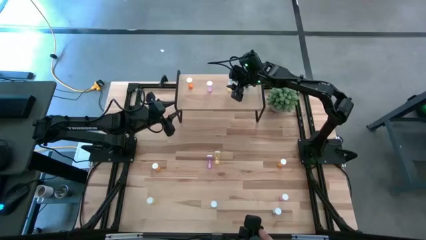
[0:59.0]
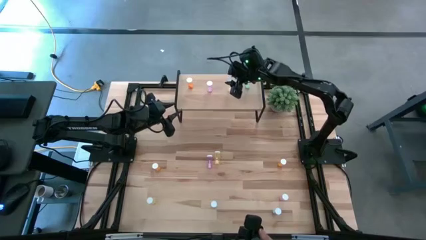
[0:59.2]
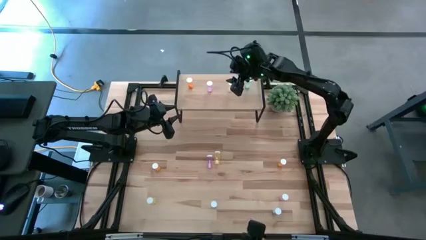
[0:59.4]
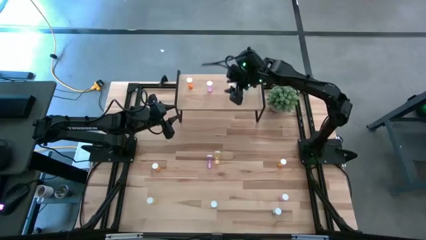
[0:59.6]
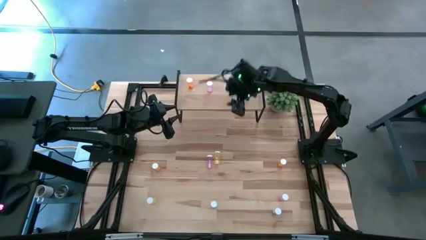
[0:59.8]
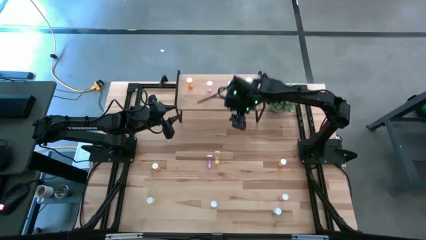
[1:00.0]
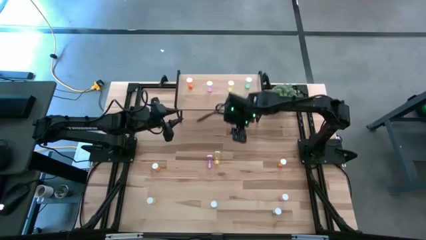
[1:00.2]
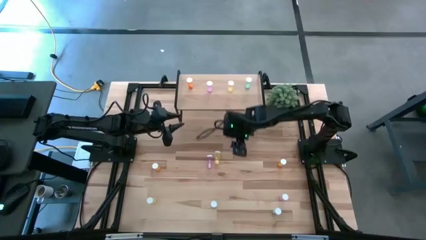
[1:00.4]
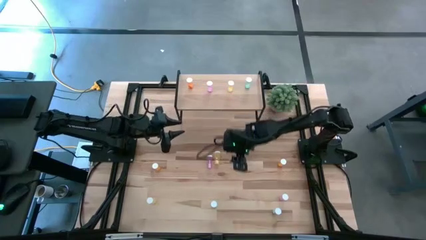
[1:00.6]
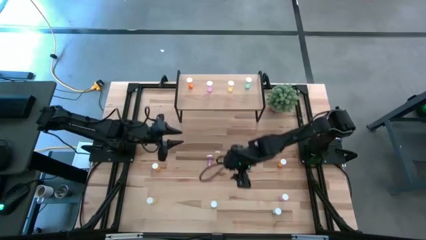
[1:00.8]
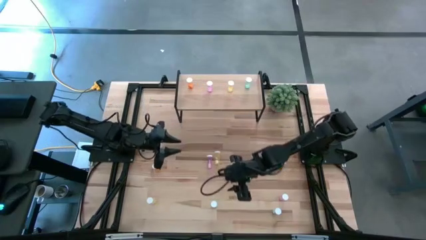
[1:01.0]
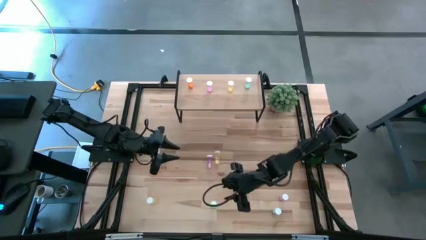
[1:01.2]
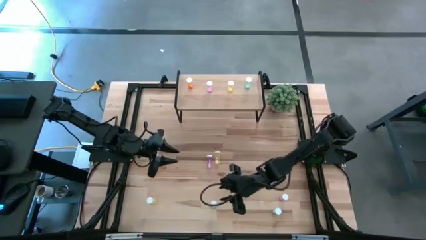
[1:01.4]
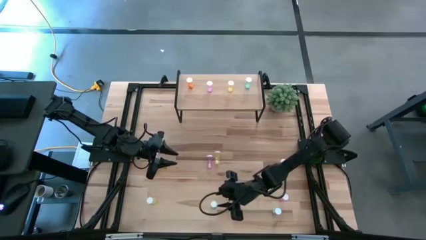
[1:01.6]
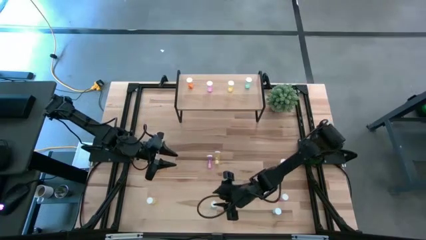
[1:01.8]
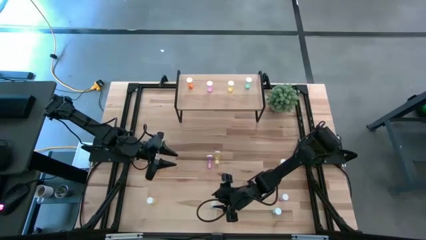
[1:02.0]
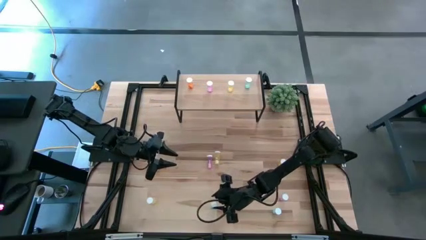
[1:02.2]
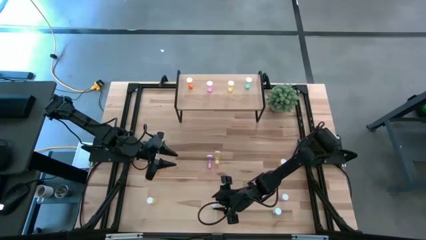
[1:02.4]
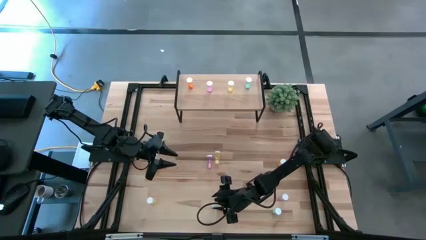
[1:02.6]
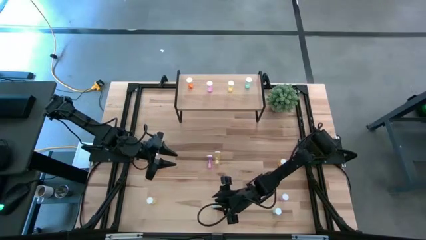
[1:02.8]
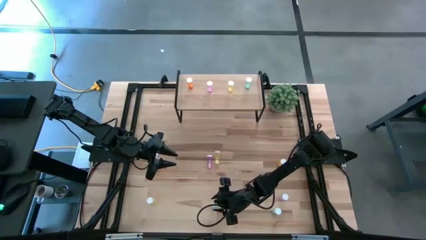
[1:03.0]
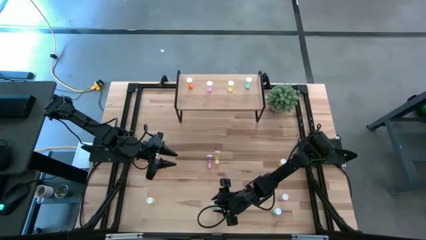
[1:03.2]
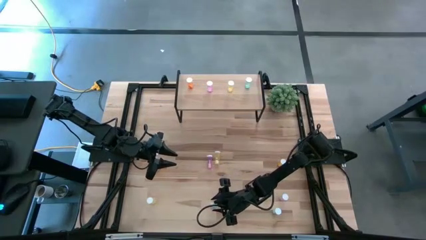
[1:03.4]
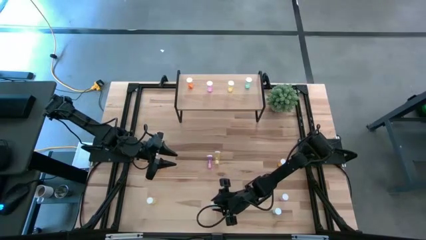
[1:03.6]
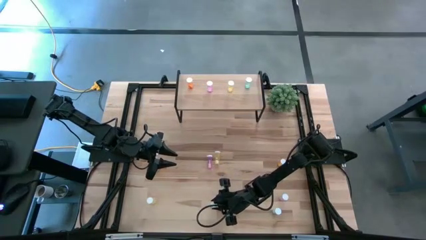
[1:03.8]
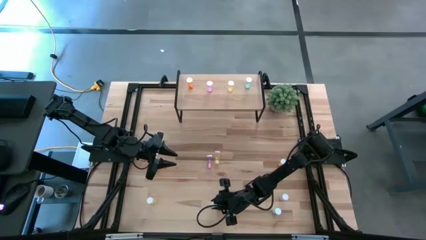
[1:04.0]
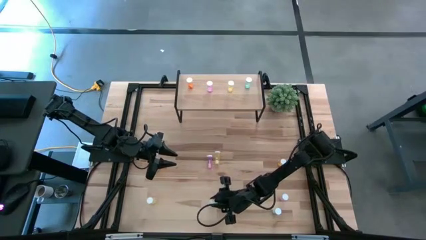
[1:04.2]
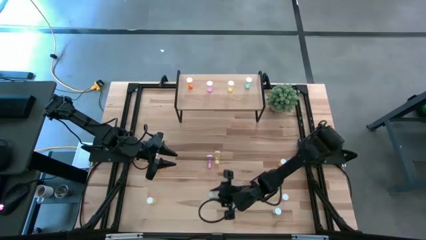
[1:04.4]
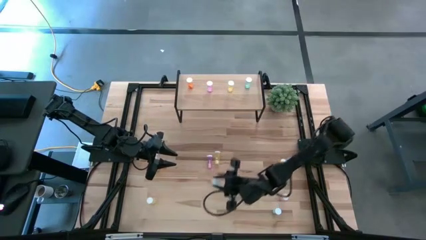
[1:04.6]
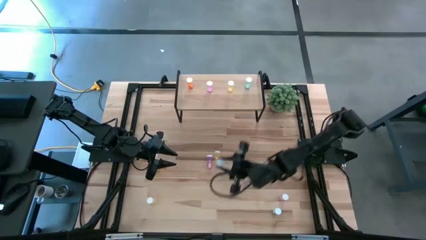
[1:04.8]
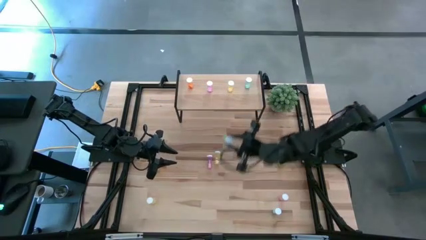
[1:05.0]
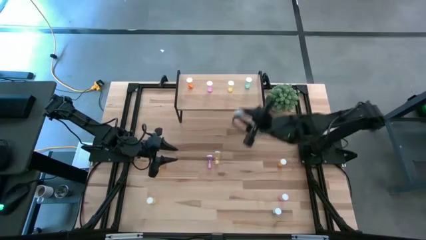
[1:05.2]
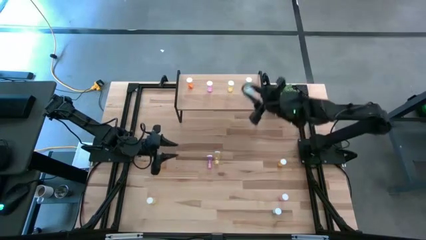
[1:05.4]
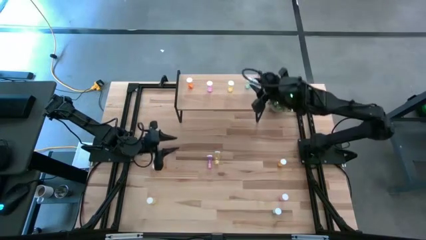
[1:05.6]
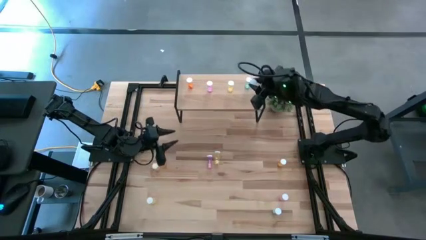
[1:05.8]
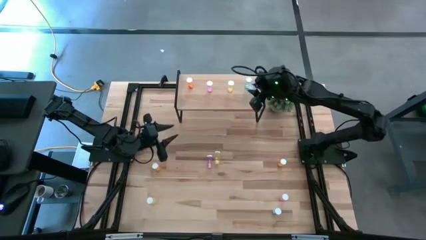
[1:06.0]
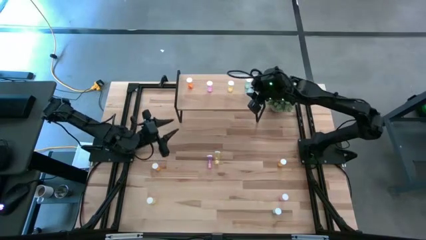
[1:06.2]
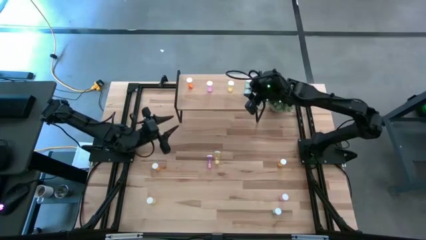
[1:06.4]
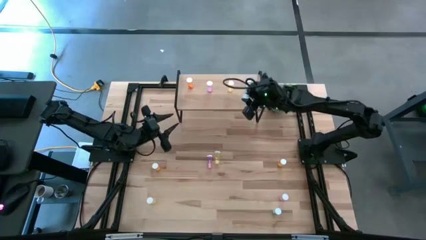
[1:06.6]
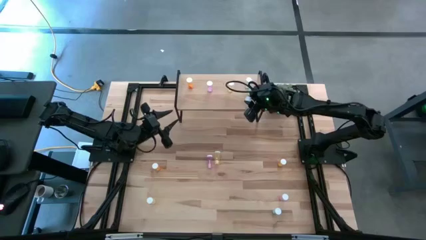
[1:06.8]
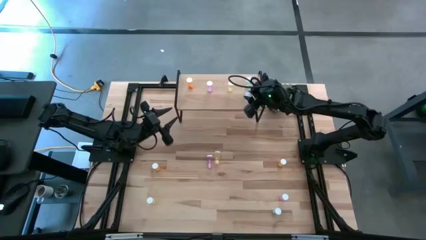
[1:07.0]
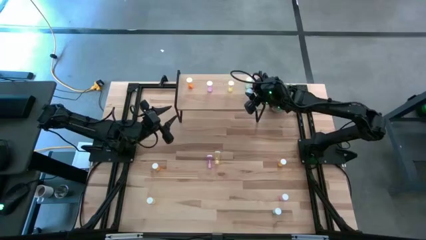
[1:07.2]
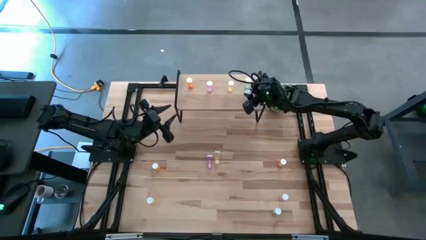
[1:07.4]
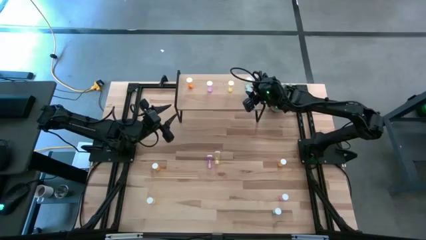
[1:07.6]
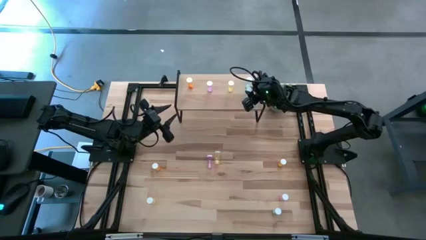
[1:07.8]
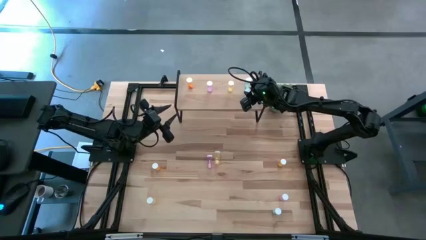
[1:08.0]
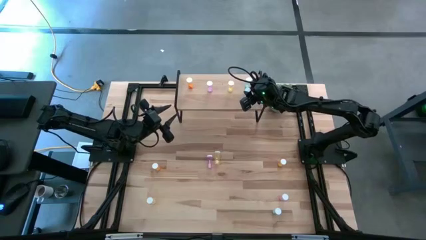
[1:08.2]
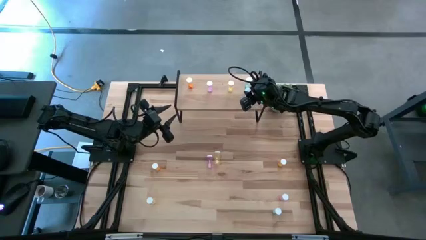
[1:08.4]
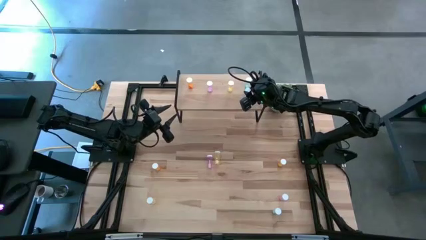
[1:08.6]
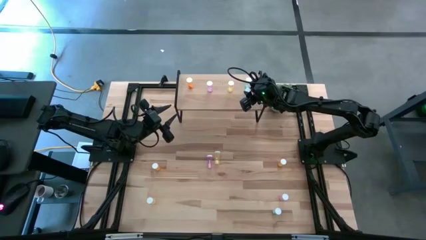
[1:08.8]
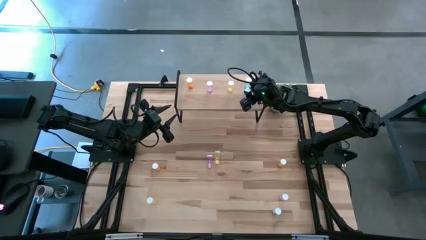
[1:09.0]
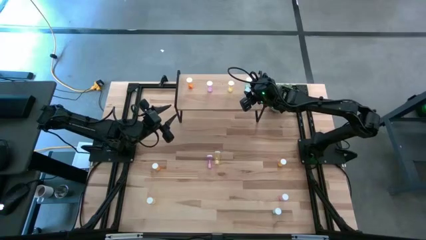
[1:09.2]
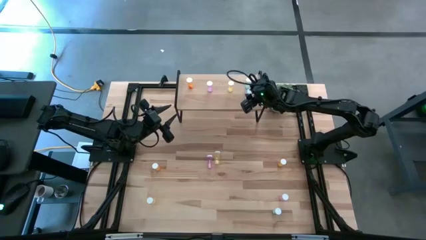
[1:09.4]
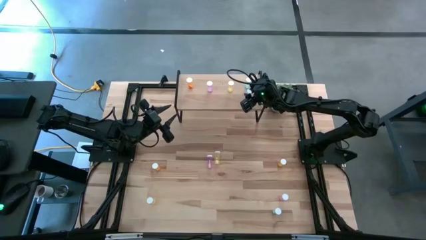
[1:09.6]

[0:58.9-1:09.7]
Task: Pick and place medicine bottles onto shelf by color
Put the left green pill bottle on the shelf aligned with the other green pill bottle

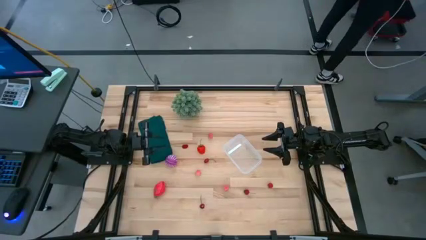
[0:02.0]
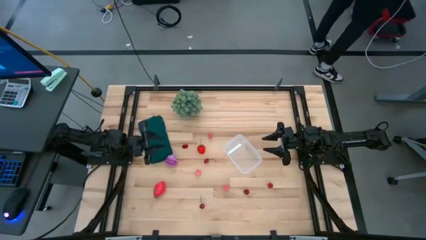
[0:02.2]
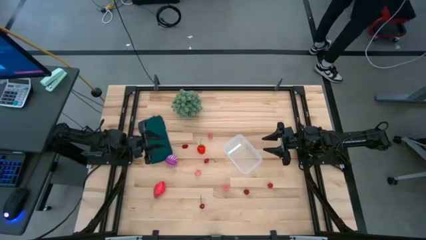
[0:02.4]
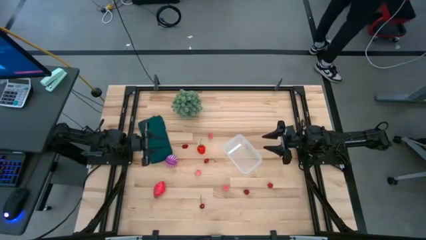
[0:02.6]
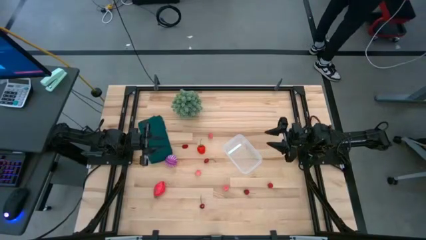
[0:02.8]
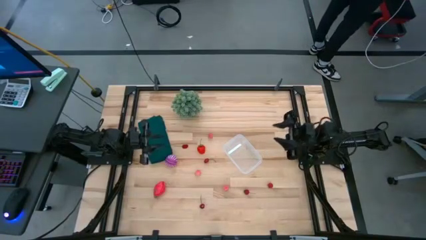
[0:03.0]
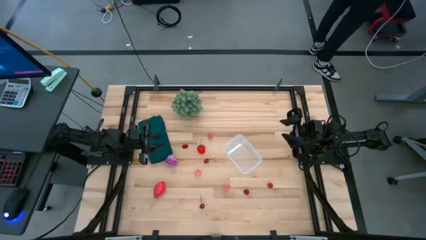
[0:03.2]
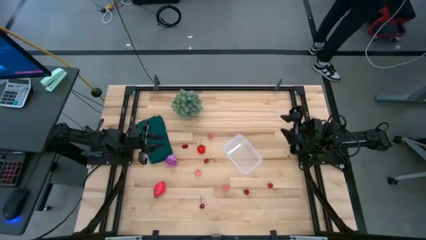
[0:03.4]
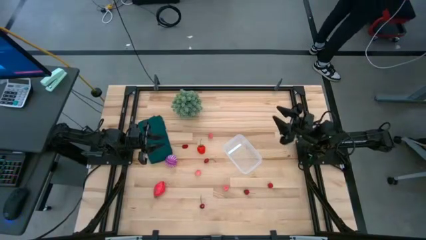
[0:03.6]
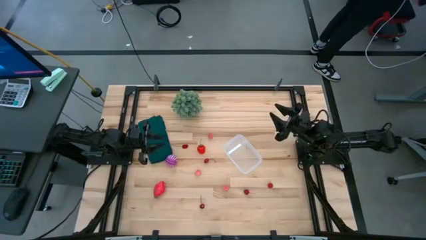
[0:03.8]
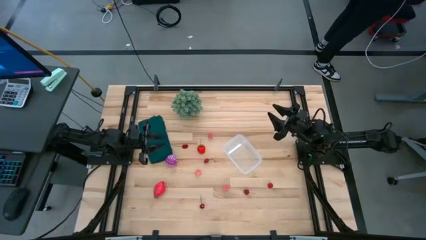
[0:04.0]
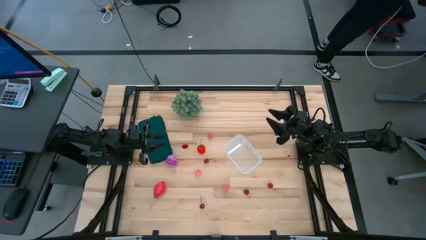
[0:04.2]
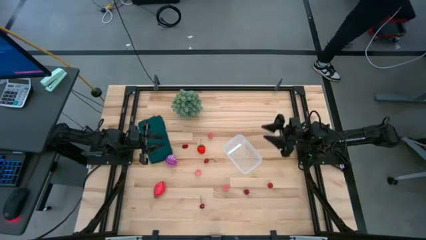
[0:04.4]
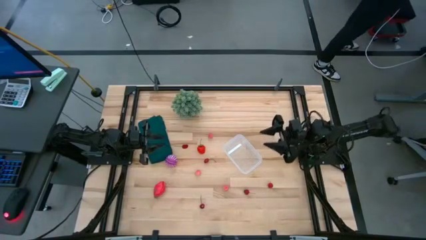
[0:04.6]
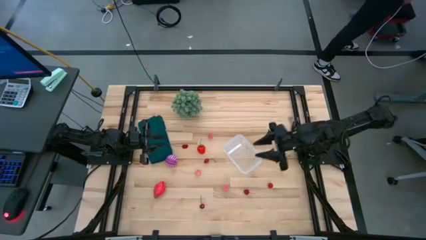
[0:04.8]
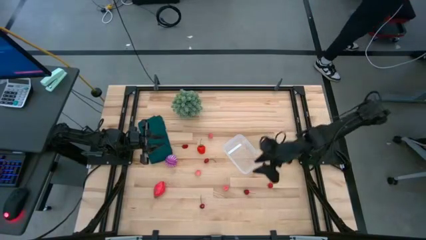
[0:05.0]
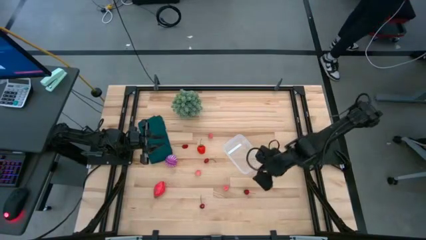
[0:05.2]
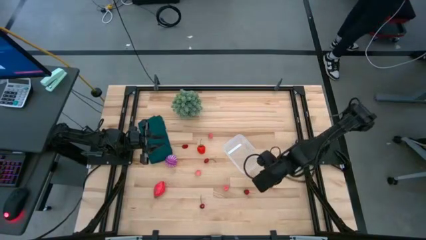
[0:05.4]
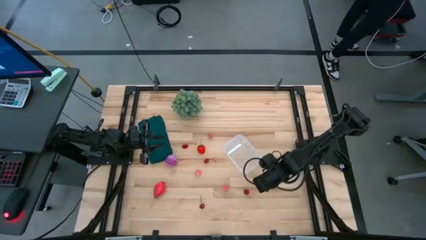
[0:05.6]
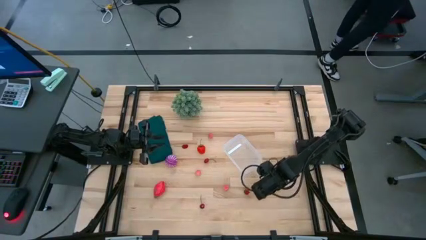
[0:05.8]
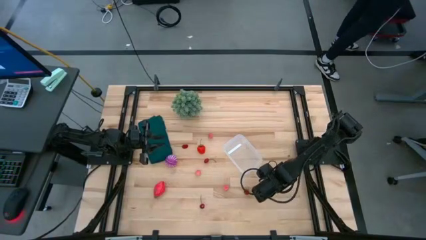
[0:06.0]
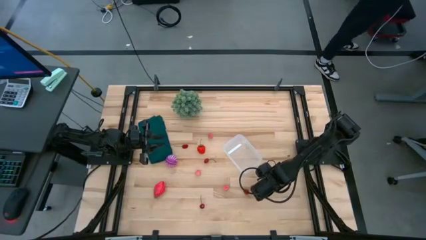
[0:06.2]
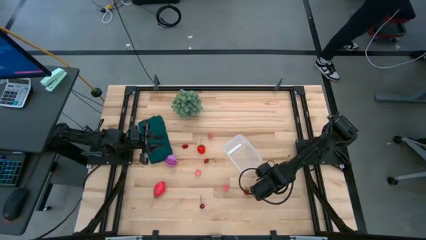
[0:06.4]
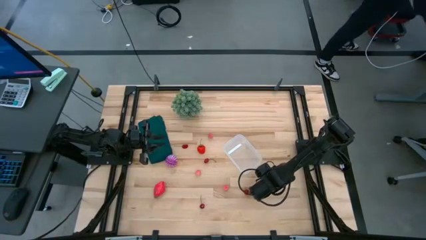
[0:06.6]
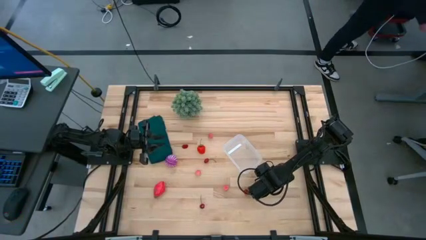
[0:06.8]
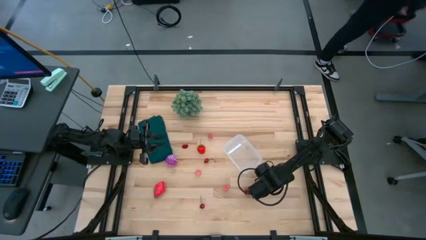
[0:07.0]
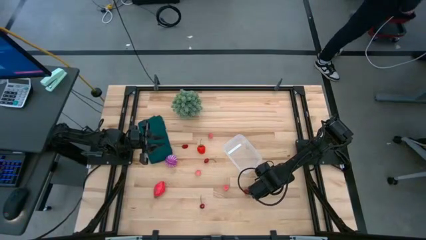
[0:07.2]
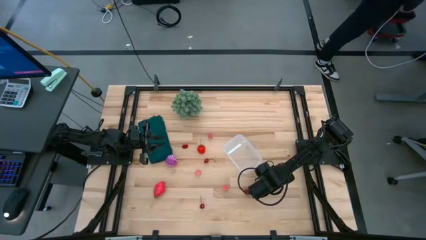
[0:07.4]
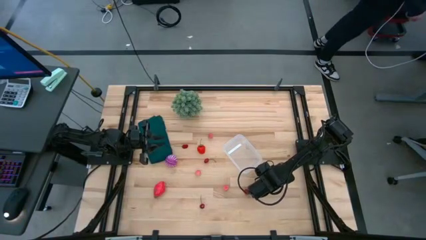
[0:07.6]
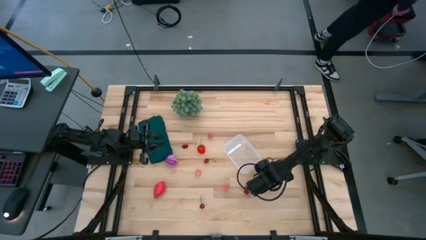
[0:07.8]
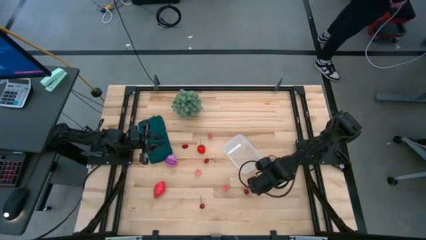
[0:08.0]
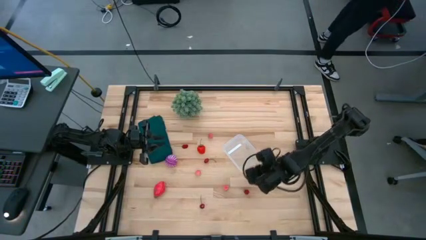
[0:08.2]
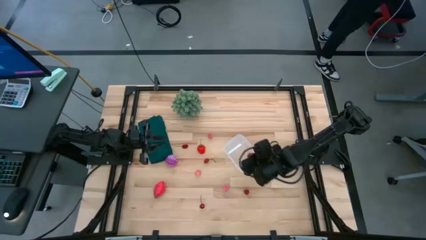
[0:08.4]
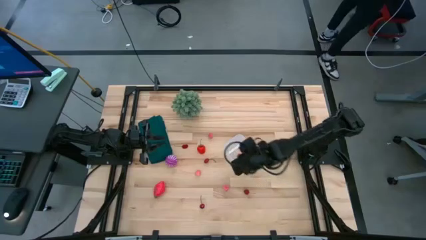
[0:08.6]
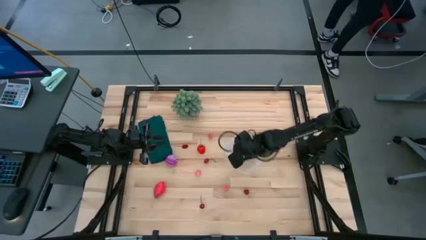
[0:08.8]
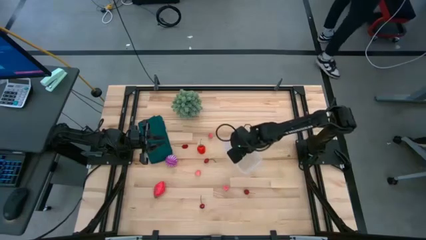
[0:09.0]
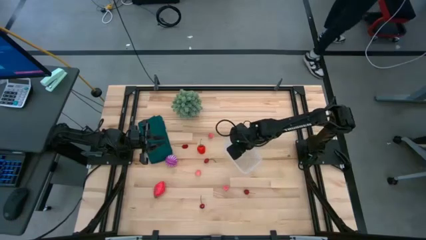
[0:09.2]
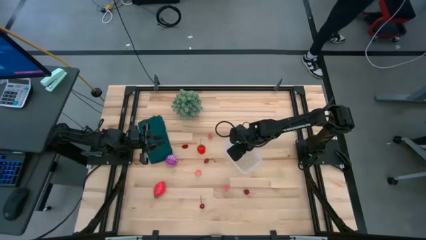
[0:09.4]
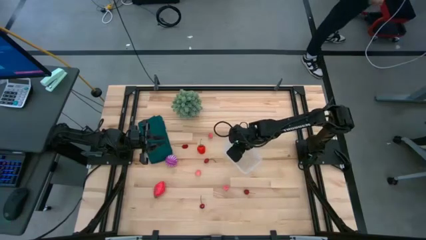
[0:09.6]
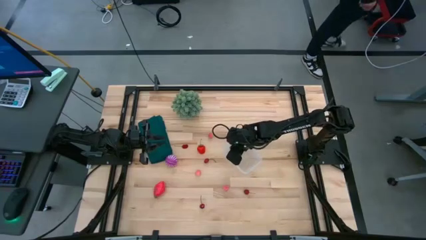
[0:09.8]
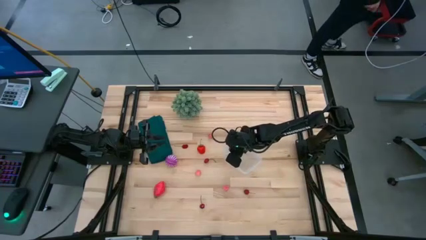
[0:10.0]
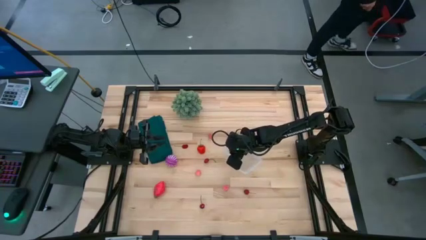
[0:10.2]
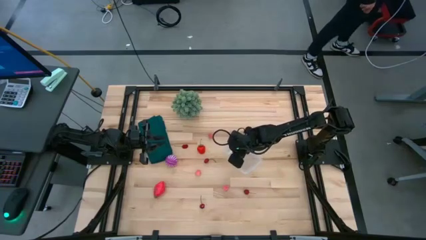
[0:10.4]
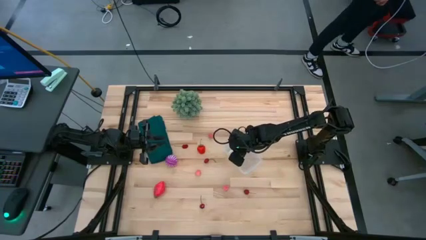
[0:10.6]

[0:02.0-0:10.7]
Task: Pick and placing Produce into tupperware
Put the red raspberry into the container
